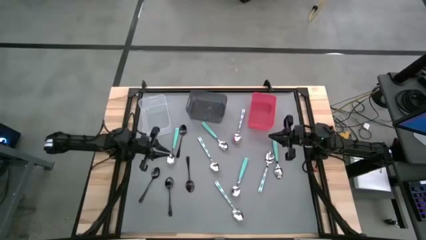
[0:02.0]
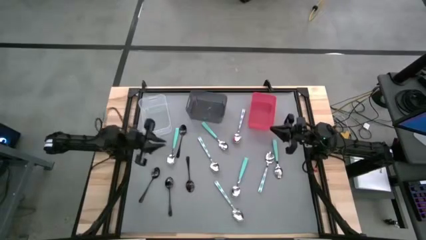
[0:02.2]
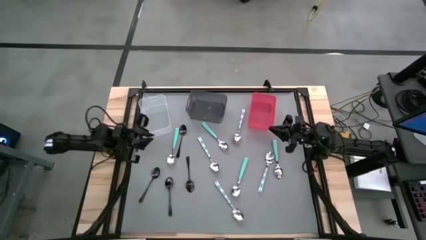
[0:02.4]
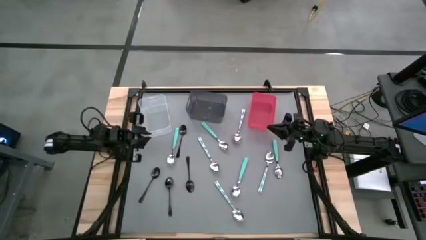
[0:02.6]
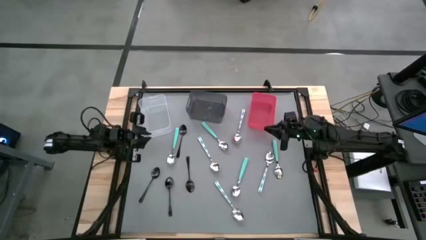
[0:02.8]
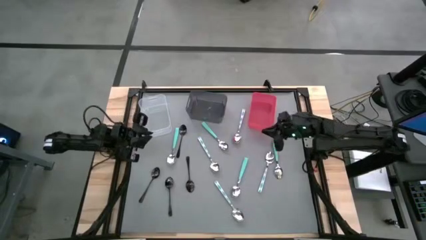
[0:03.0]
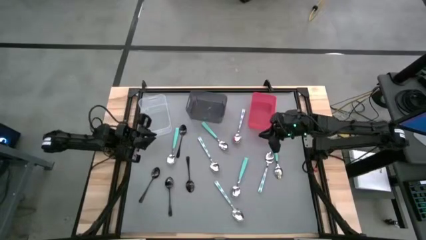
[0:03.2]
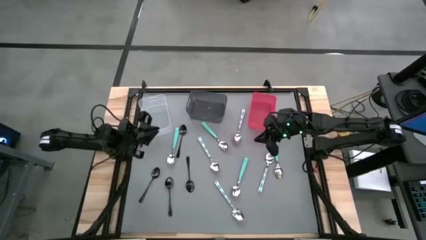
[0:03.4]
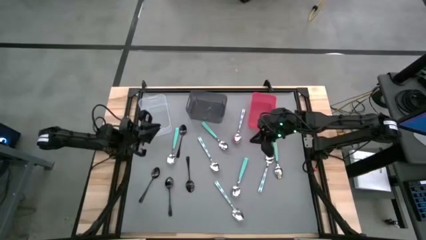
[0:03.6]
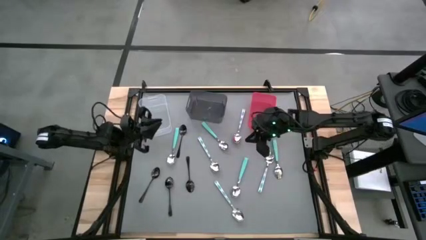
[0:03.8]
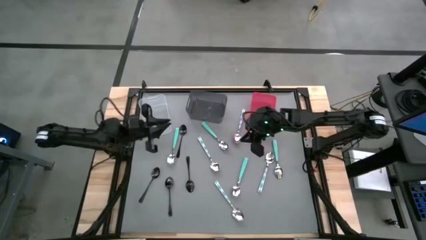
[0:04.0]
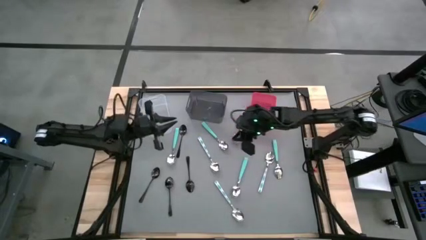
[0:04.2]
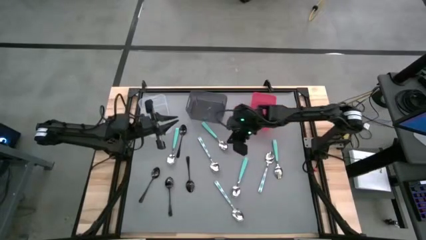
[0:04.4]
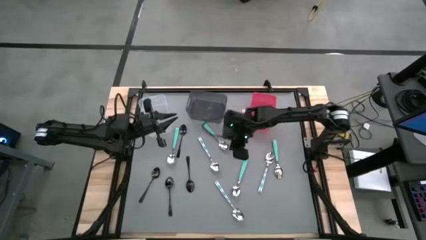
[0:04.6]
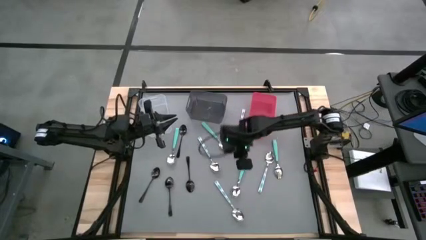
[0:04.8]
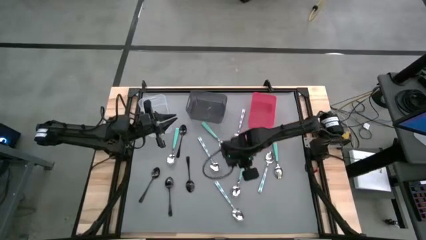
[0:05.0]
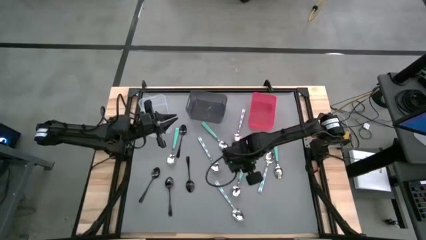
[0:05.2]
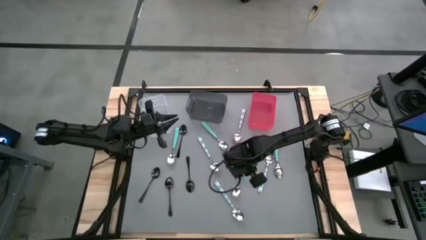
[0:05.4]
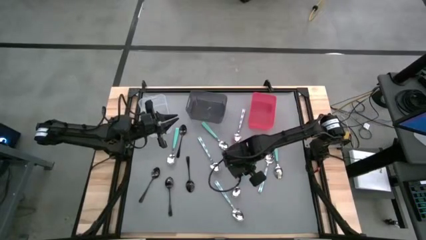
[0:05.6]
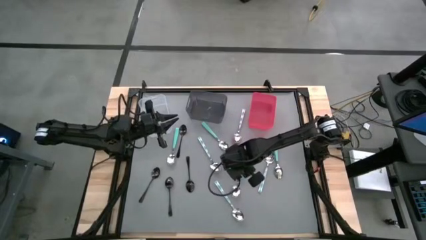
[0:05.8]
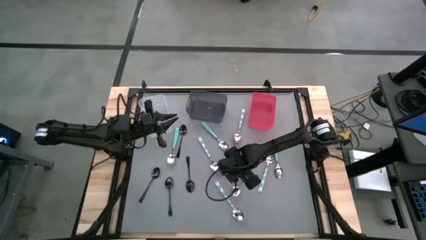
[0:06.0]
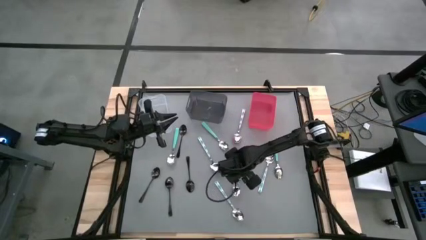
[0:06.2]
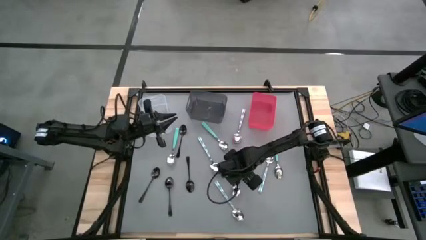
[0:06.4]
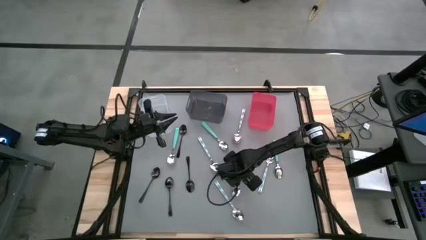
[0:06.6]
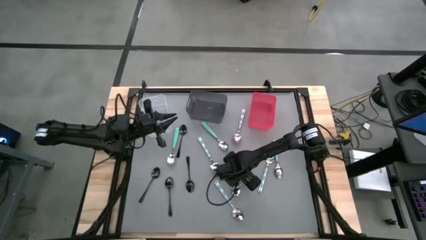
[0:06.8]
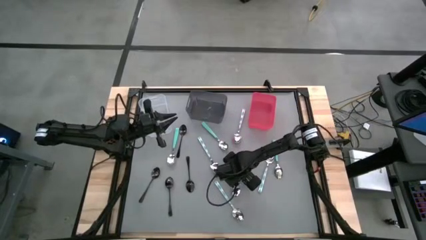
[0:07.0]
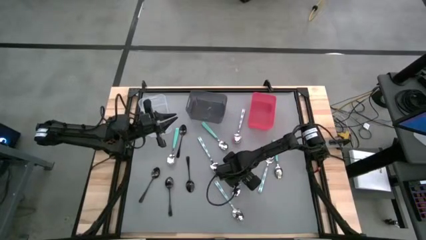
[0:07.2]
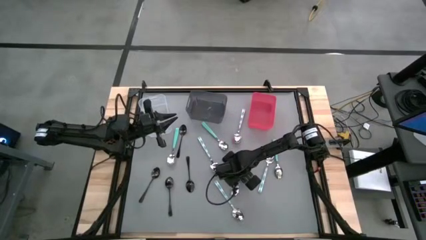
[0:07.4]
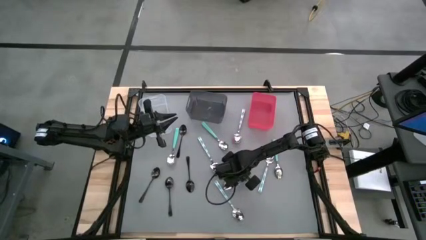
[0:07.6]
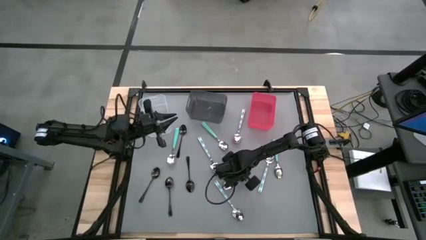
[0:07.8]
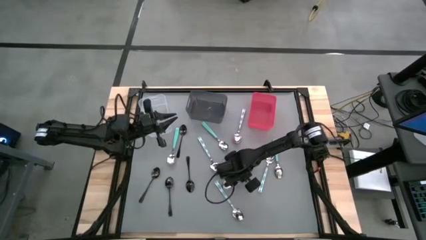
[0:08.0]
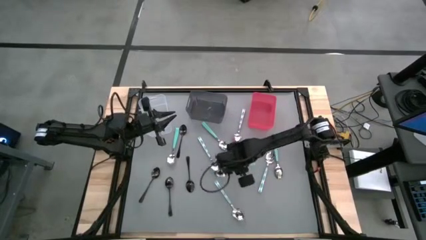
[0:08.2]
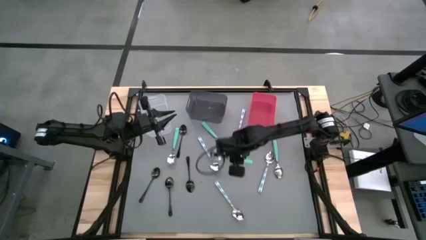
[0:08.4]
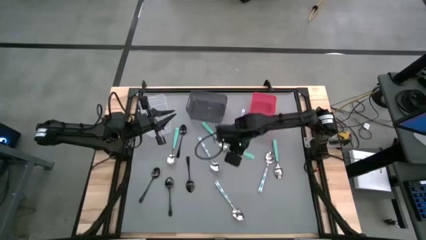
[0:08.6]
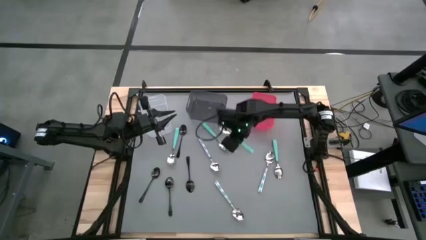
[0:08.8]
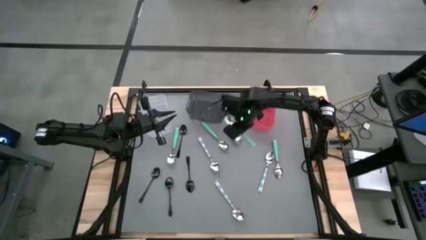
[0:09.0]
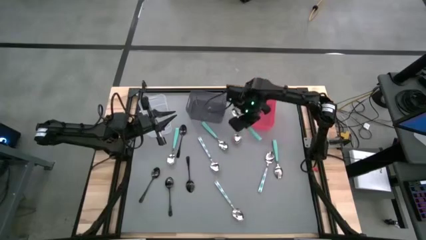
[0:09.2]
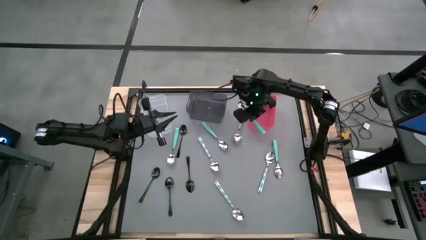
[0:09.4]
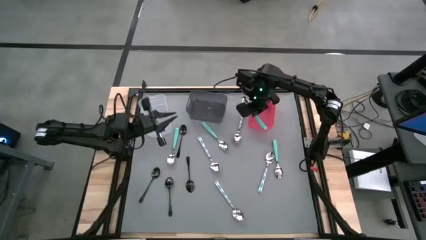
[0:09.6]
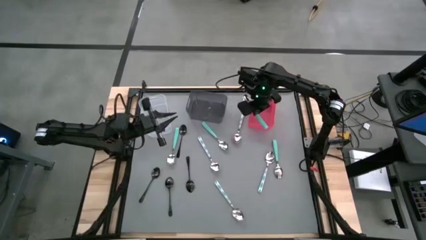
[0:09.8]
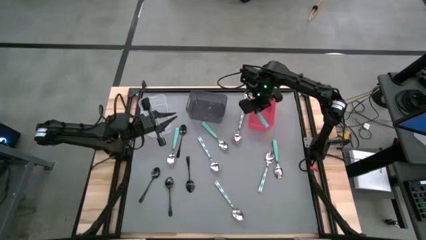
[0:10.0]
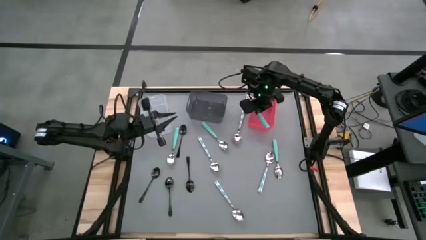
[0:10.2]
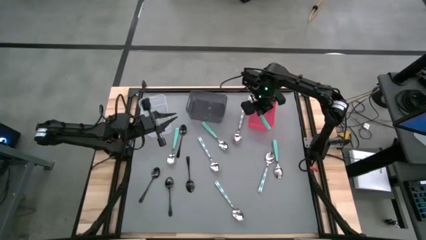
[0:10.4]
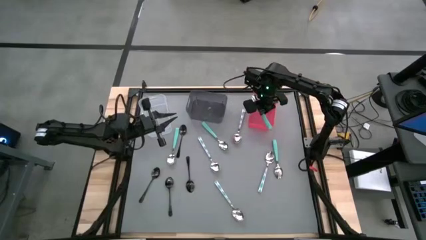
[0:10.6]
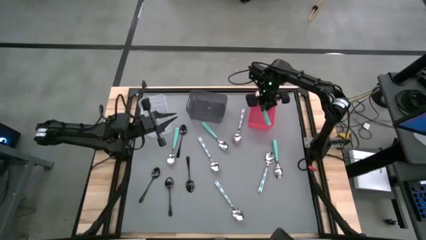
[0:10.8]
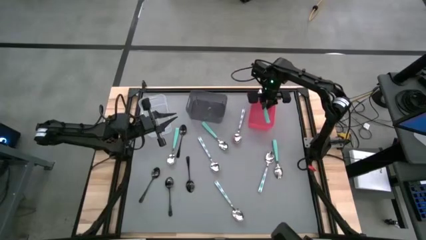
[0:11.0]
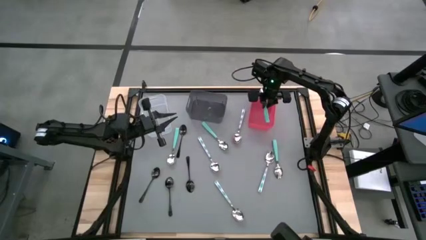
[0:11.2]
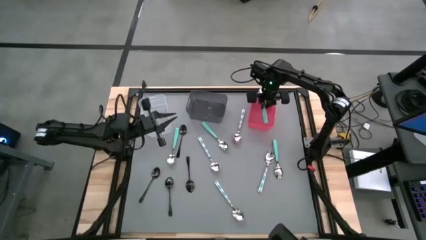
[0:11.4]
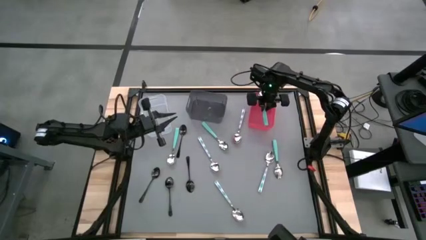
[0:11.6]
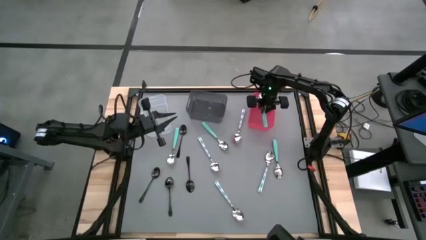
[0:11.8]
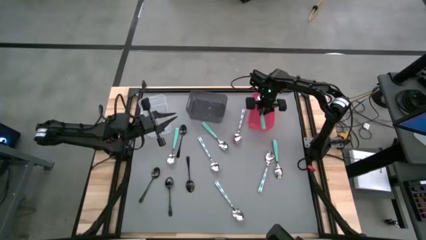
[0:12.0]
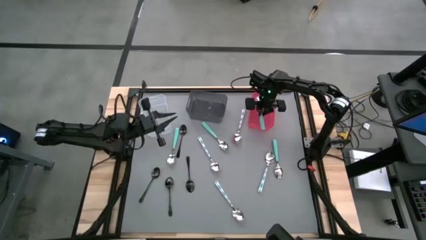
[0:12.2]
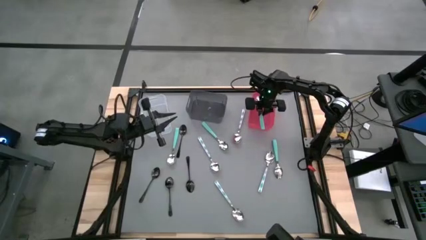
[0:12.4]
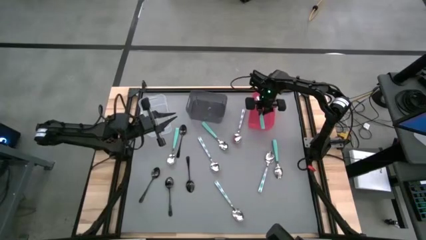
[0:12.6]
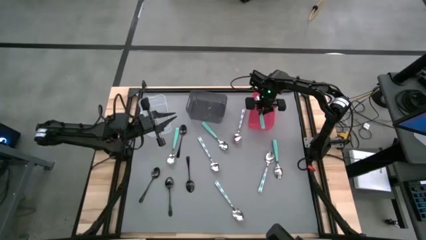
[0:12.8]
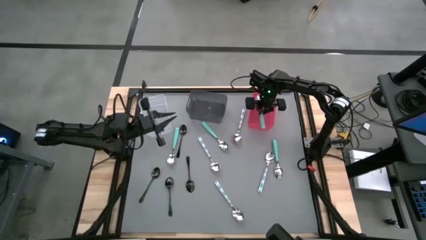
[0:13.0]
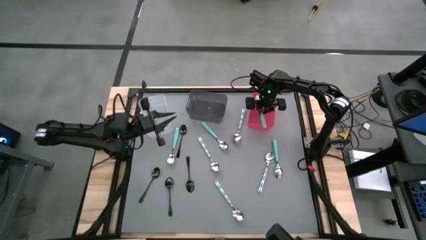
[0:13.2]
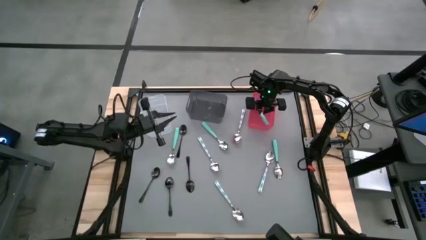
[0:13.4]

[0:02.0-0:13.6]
Task: Sort silverware by color (type)
Put the bottom green spoon into the red bin

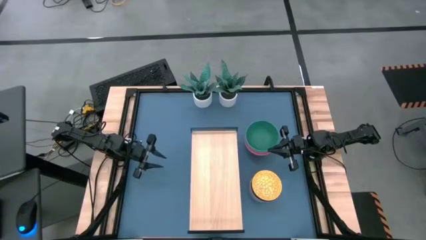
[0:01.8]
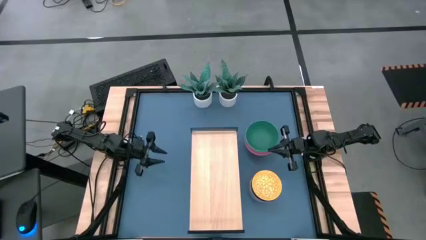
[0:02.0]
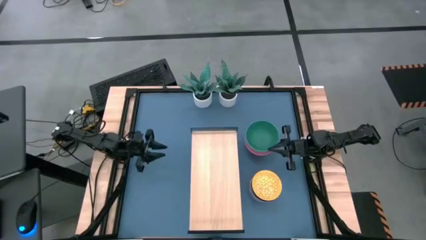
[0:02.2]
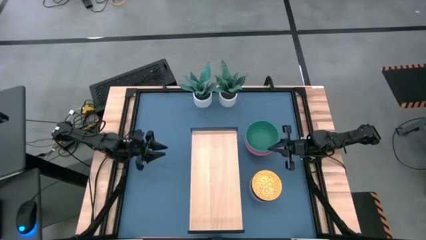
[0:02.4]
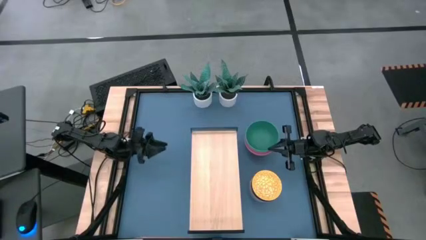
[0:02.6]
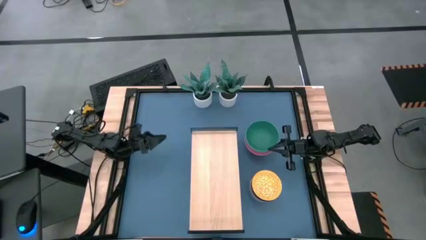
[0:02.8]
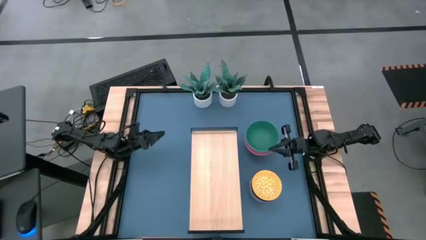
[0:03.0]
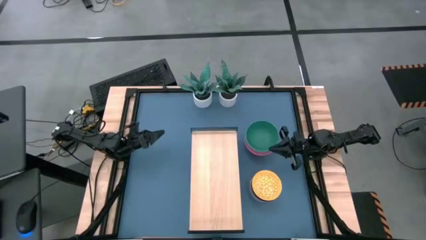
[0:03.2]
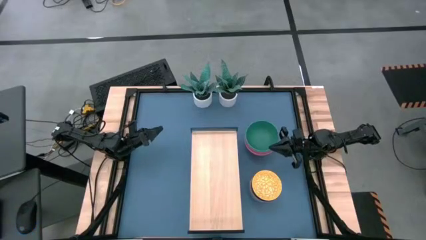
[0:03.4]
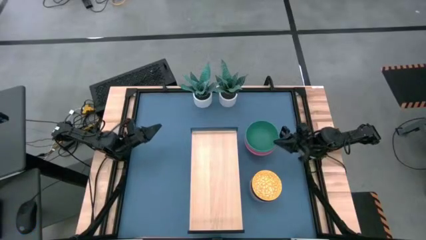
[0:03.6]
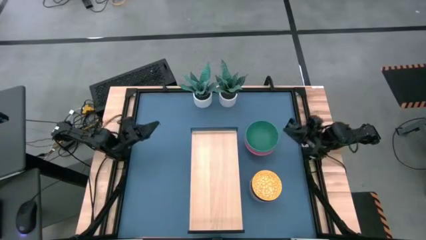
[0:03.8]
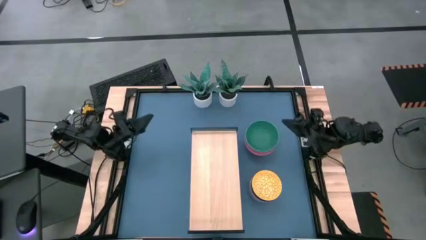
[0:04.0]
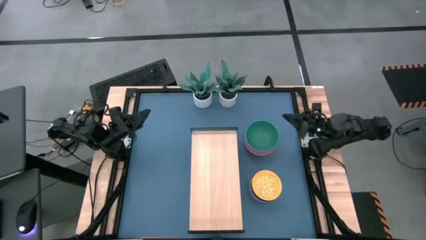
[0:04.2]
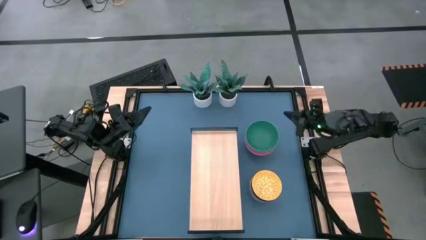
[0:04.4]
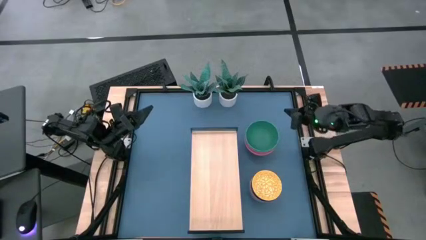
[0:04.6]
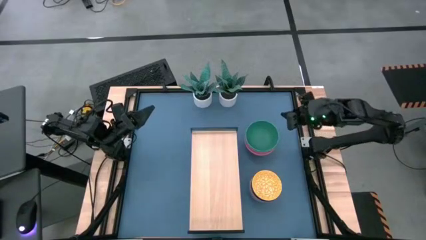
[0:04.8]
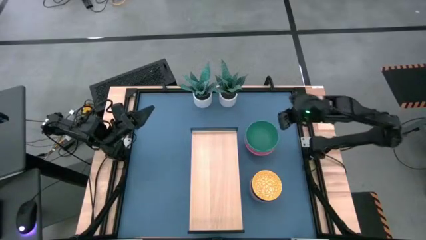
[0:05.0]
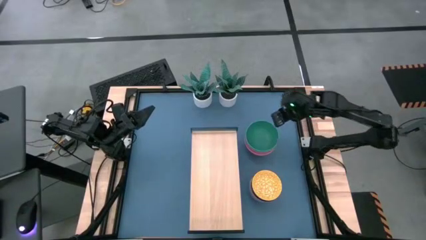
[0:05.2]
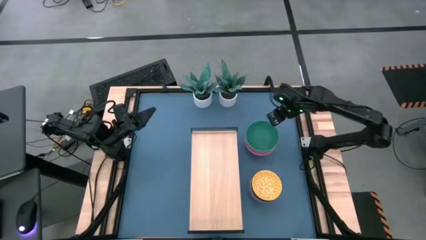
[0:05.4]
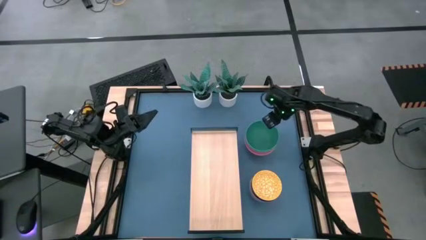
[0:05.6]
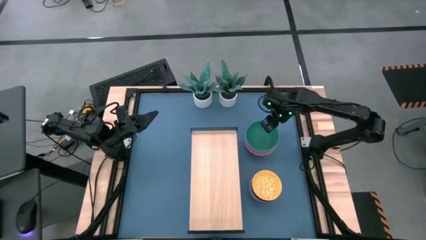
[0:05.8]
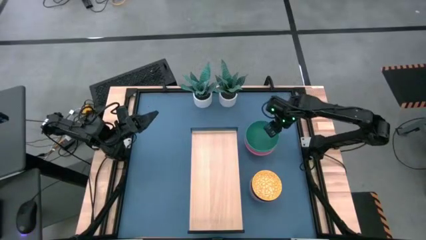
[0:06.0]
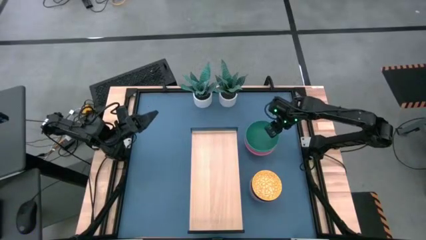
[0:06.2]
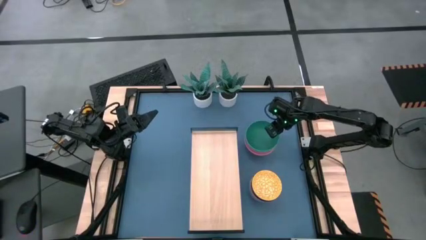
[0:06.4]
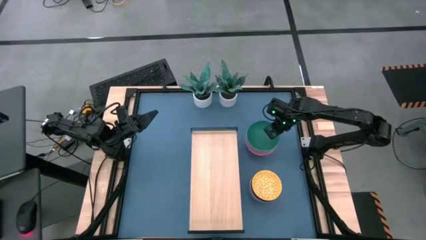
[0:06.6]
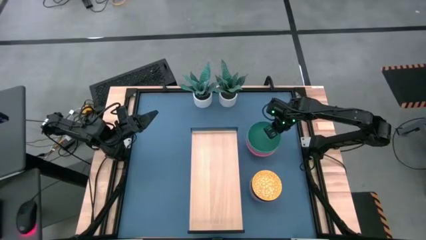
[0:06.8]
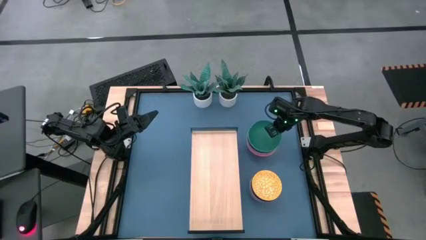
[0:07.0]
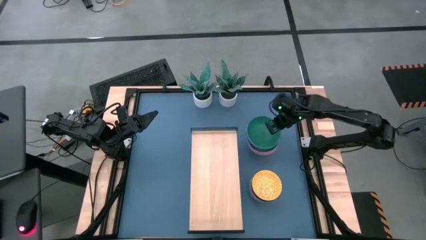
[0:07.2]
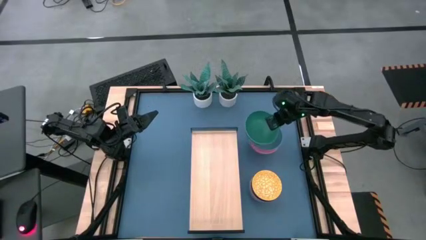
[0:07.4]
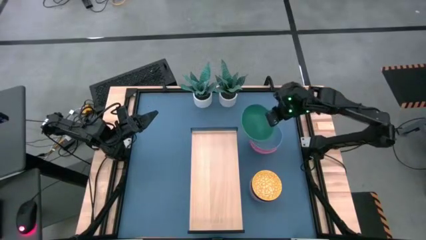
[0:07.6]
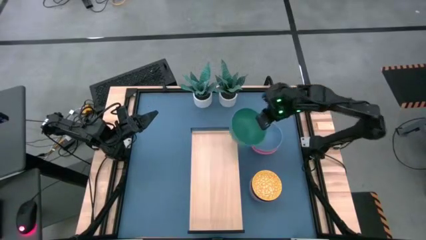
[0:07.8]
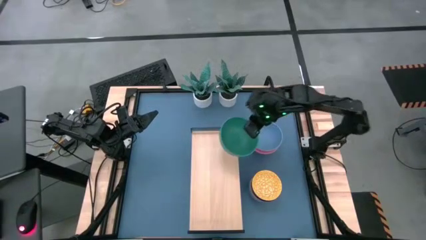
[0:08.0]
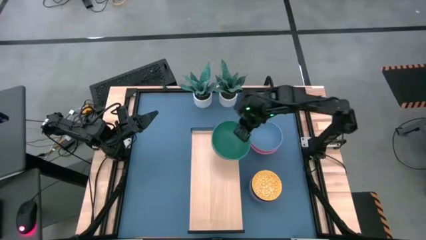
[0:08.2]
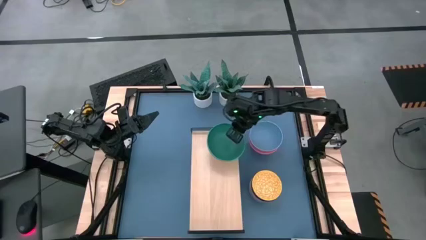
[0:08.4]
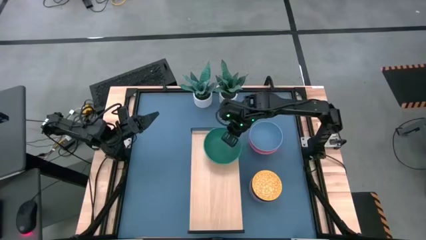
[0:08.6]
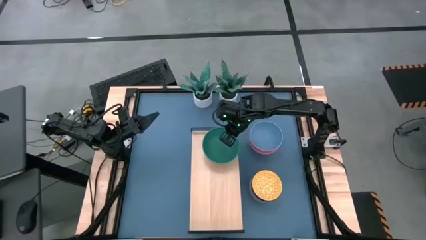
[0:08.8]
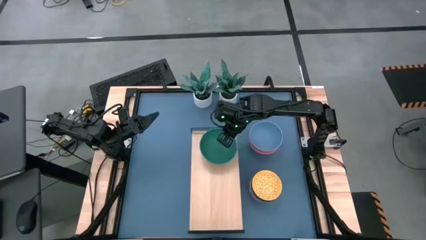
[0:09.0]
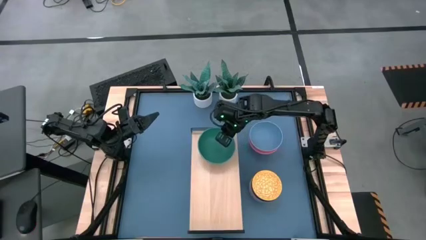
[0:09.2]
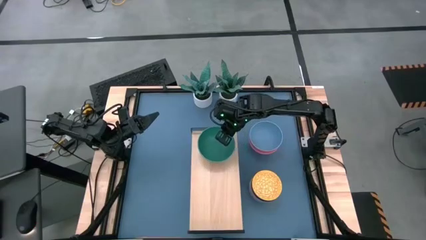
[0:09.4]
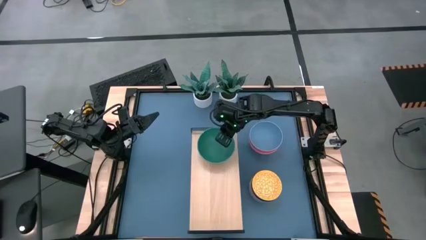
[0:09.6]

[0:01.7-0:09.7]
Task: Place and stack bowls onto a shelf
Put the green bowl on the shelf
